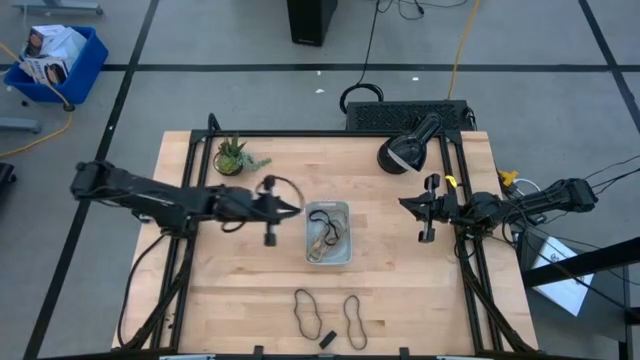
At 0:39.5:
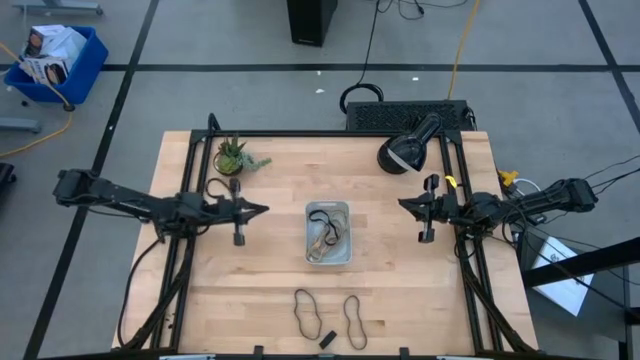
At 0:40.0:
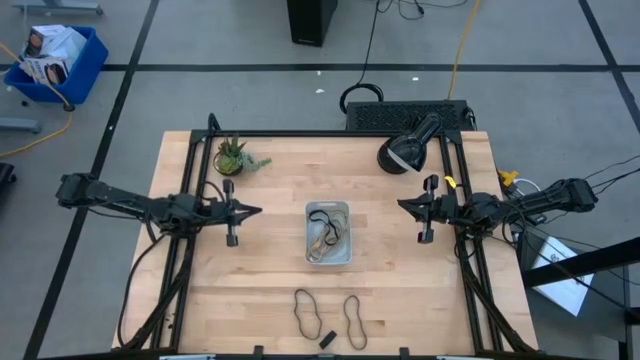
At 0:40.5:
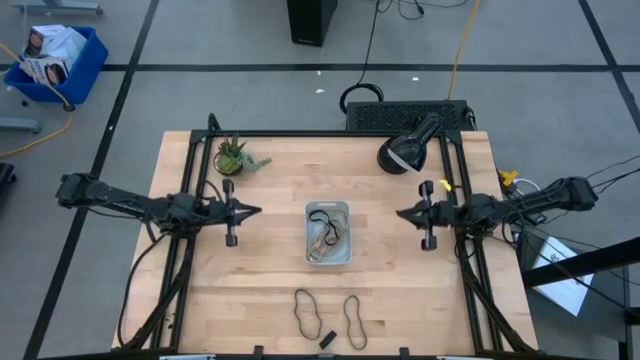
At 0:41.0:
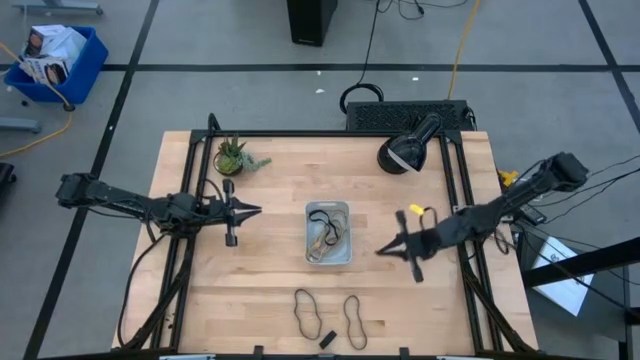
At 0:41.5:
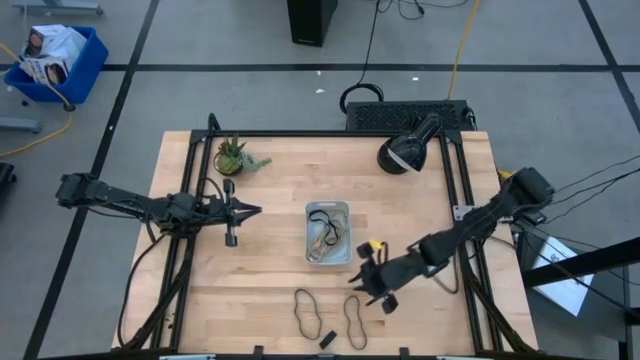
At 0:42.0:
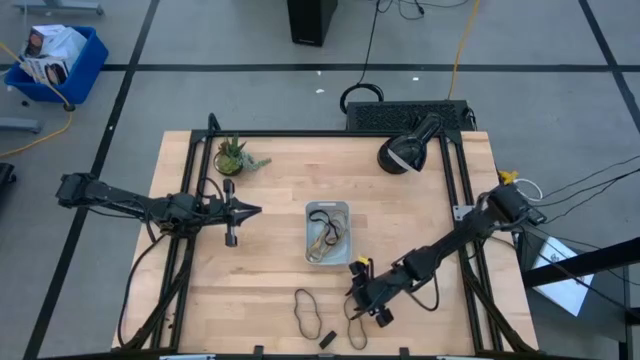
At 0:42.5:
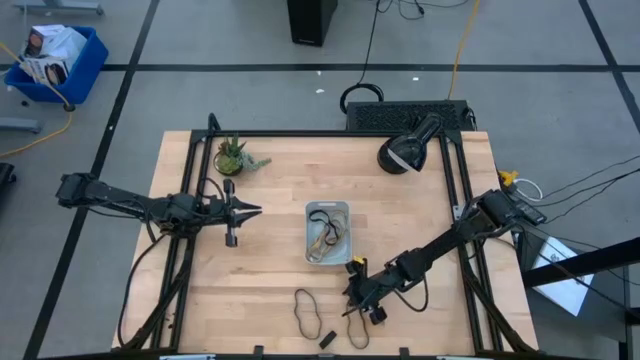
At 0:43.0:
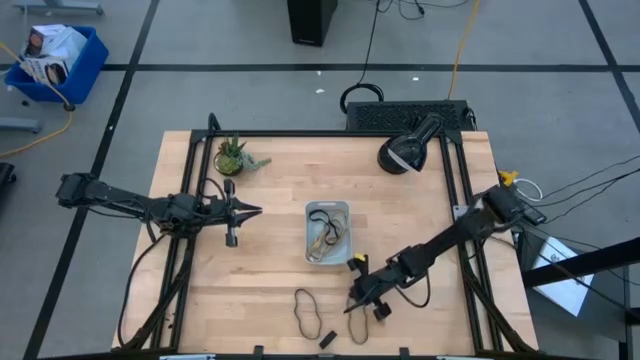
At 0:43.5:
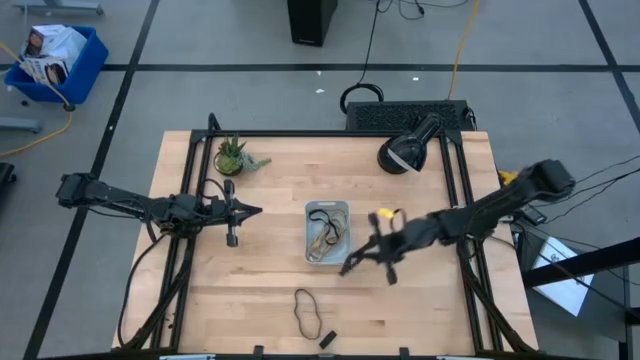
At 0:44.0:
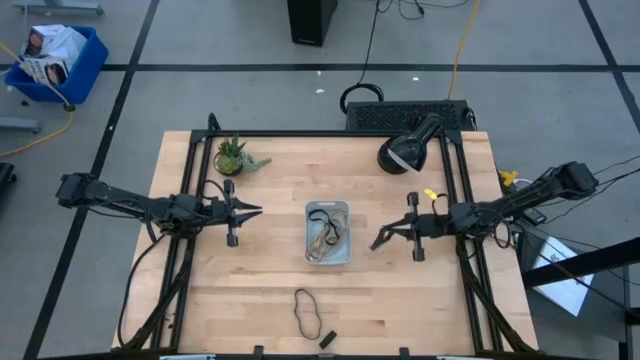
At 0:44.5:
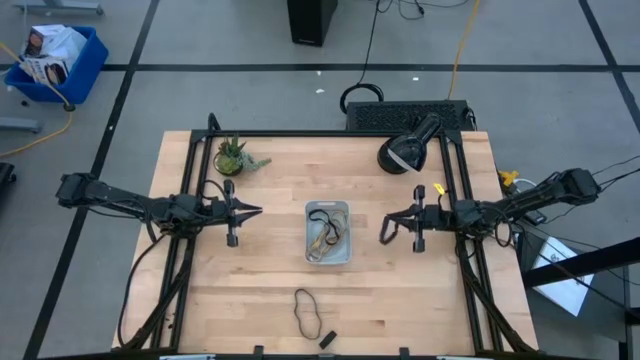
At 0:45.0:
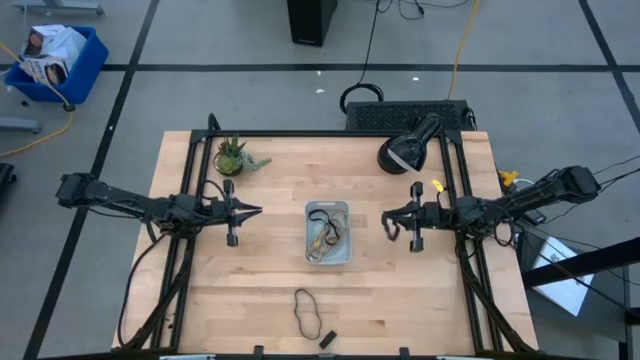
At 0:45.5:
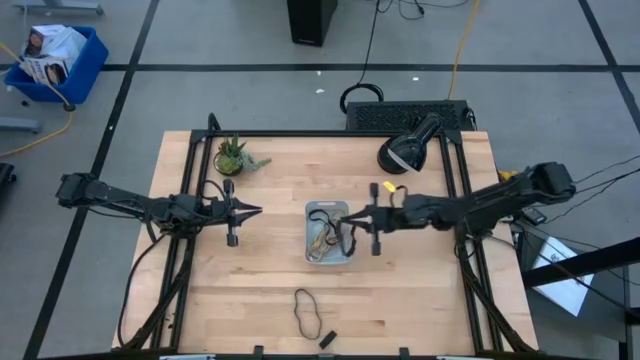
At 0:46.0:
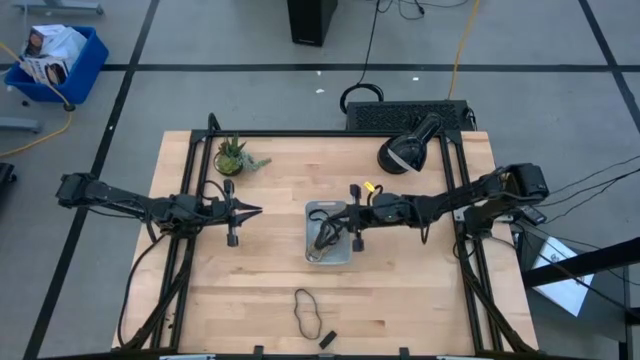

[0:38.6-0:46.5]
Task: Pick and place rubber bands into bin
Put the right black rubber band into the bin

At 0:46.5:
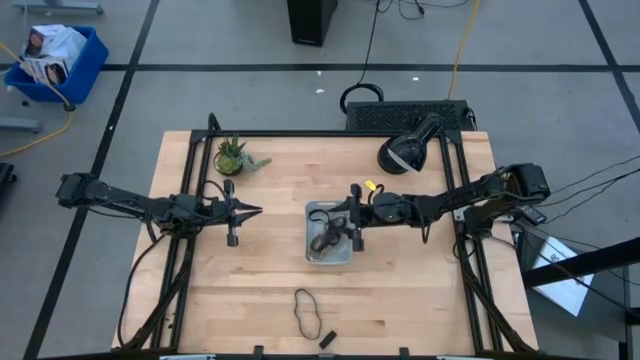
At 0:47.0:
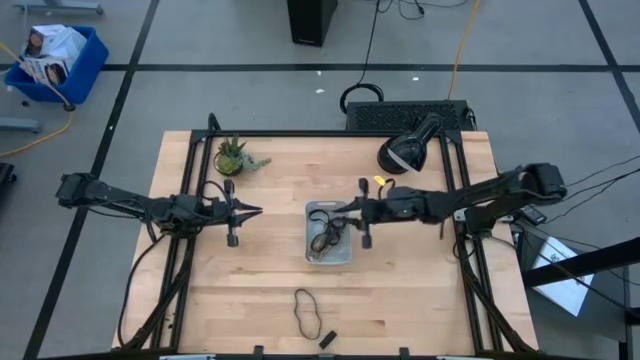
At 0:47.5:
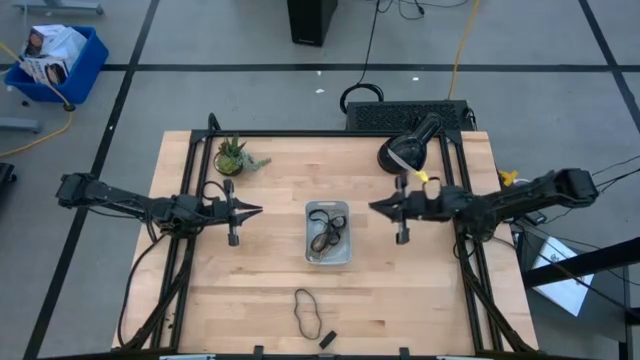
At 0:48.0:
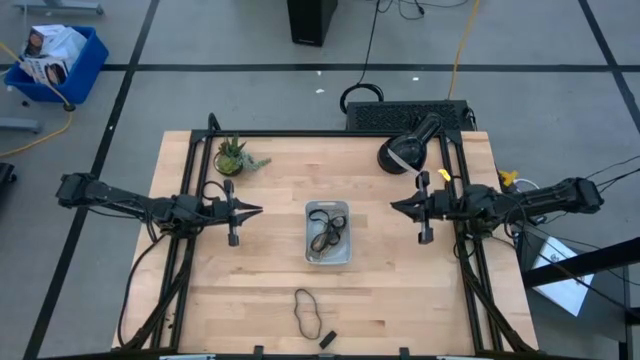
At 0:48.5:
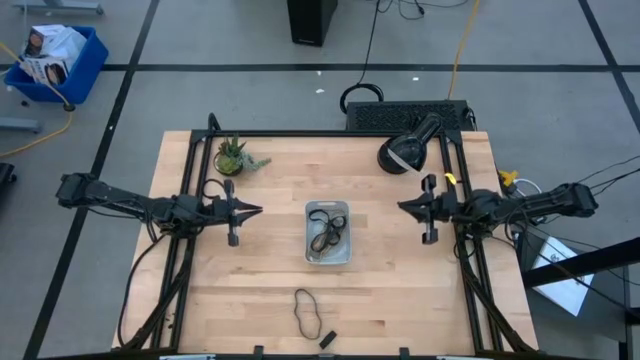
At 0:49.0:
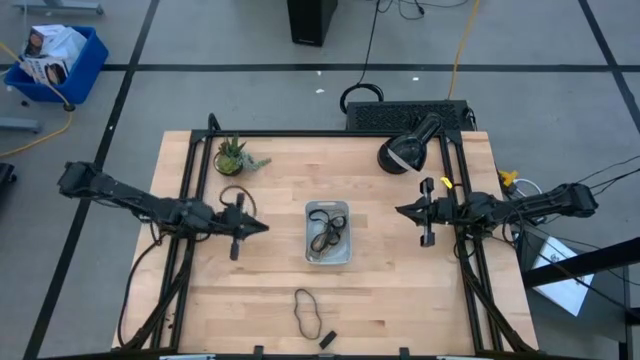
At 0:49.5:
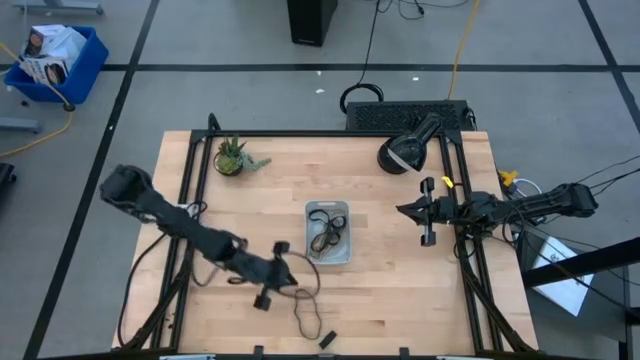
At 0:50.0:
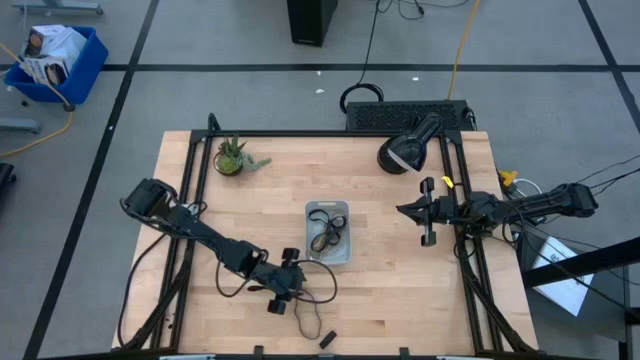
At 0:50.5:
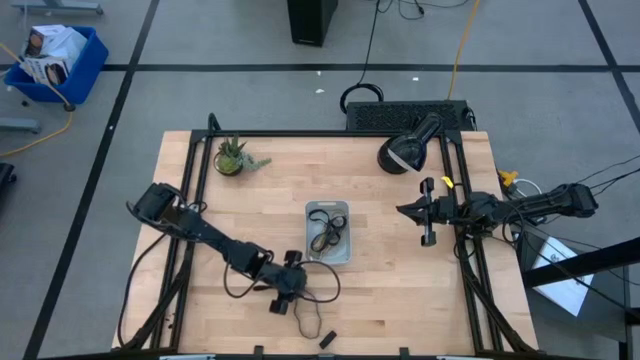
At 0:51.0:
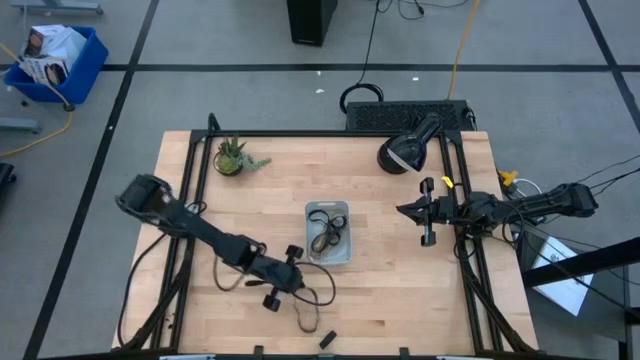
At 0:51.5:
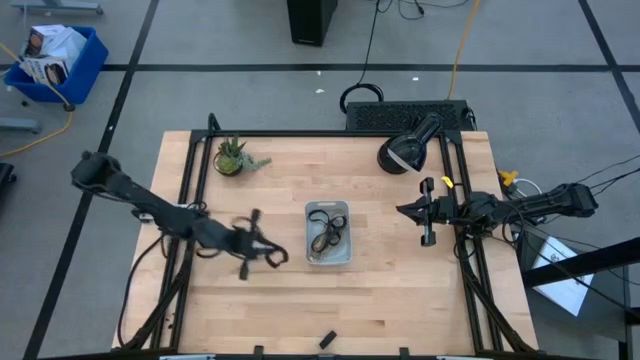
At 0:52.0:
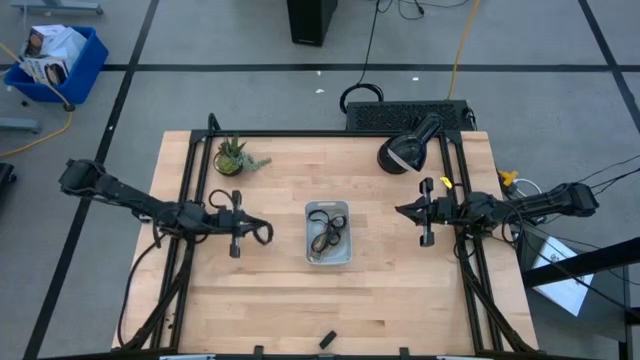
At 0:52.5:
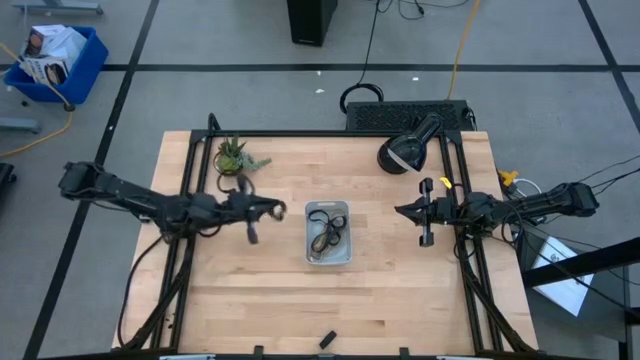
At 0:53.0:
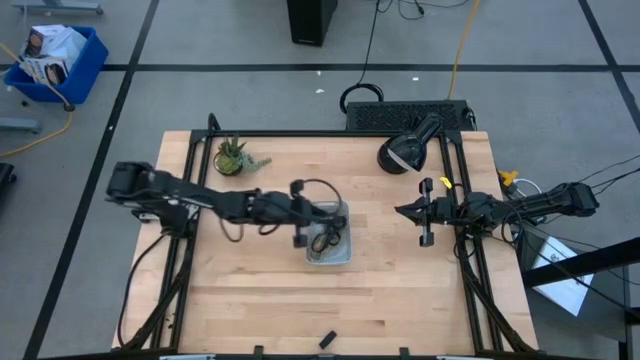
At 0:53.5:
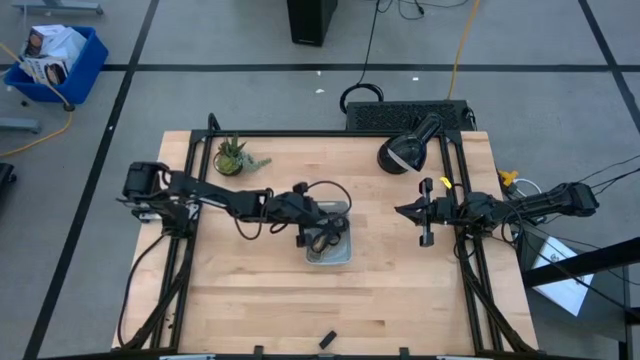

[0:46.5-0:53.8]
Put the black rubber band into the bin

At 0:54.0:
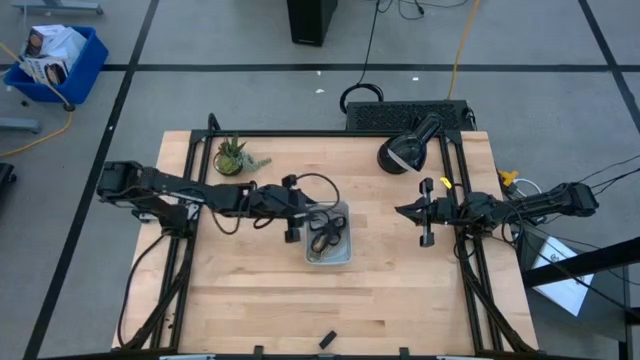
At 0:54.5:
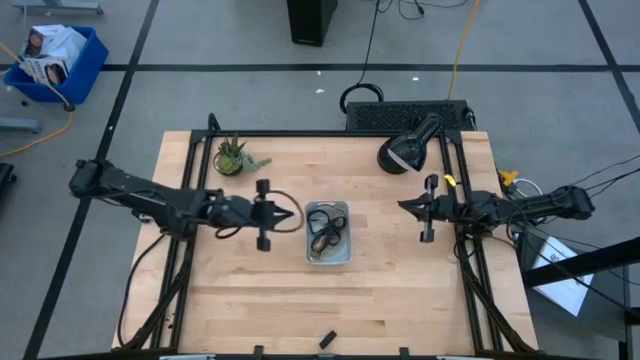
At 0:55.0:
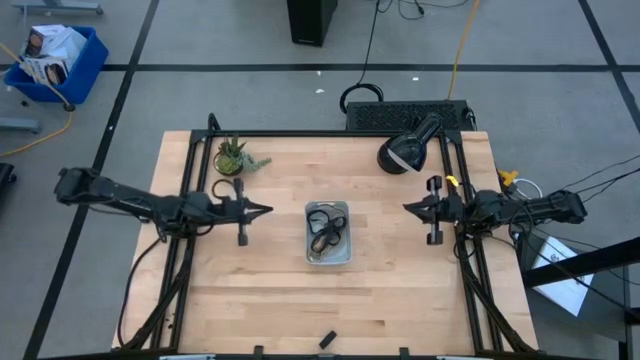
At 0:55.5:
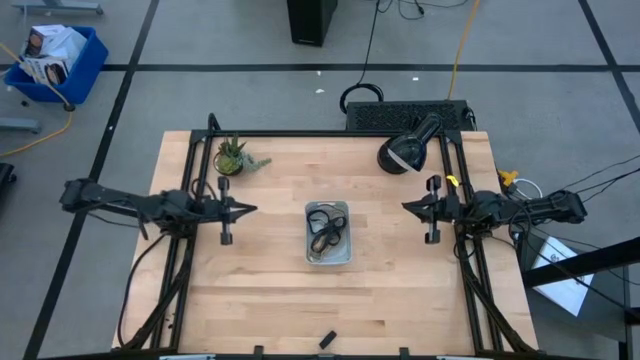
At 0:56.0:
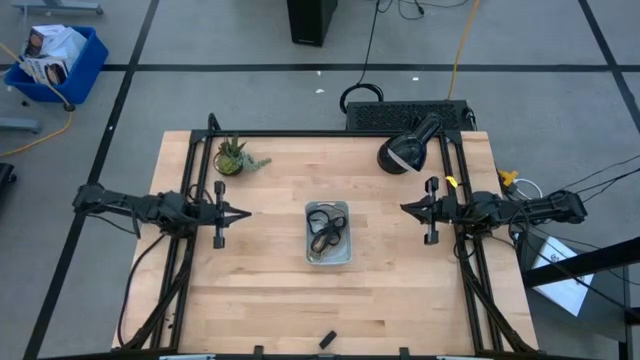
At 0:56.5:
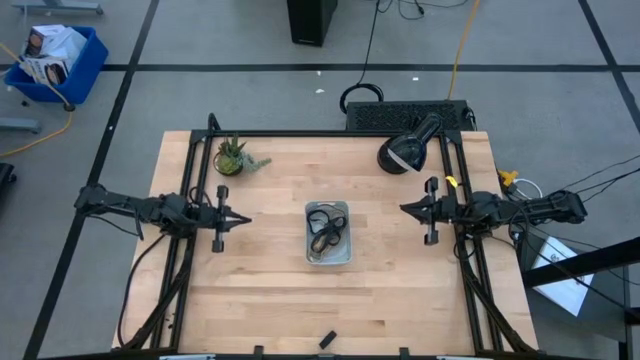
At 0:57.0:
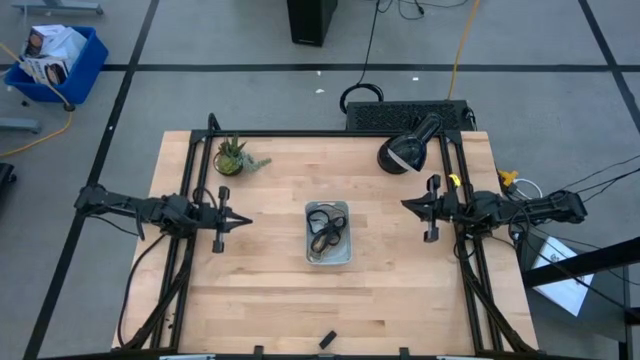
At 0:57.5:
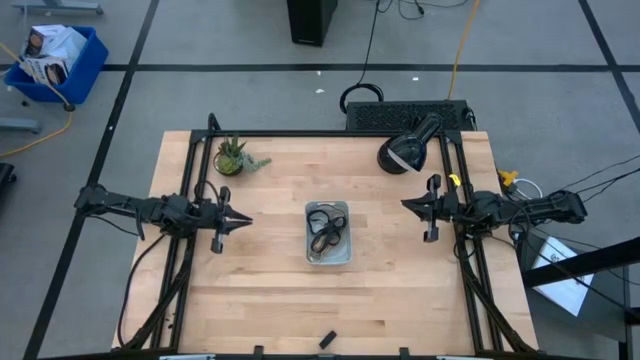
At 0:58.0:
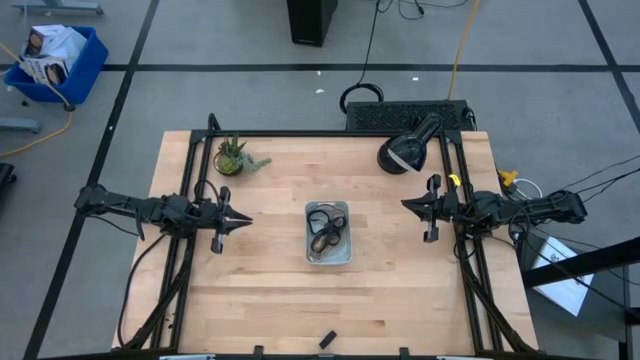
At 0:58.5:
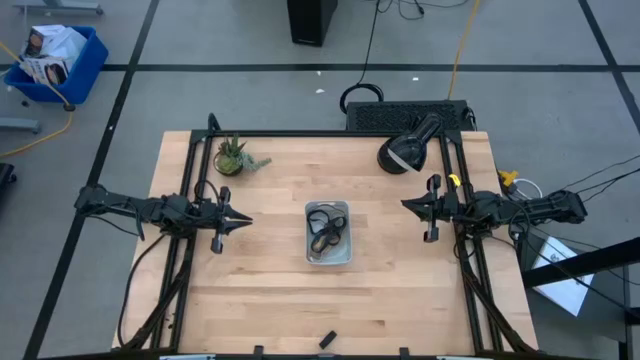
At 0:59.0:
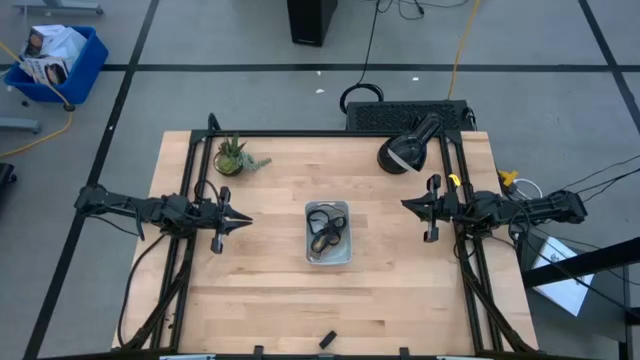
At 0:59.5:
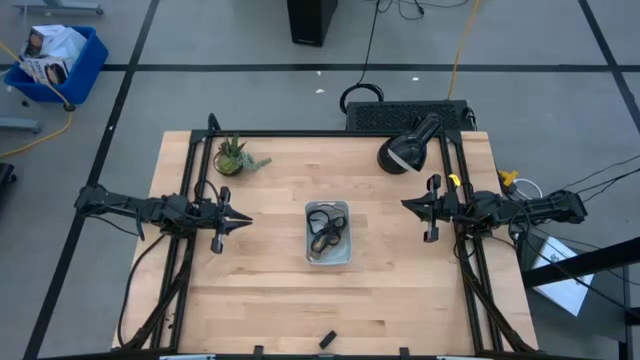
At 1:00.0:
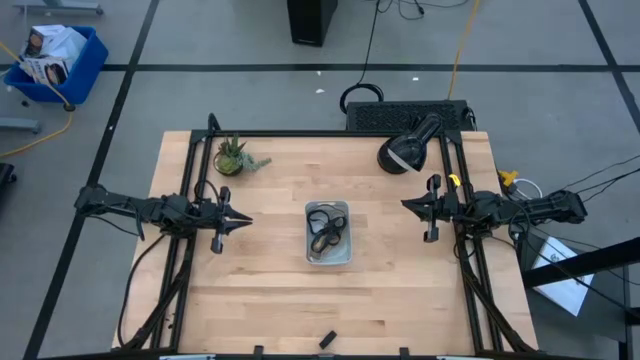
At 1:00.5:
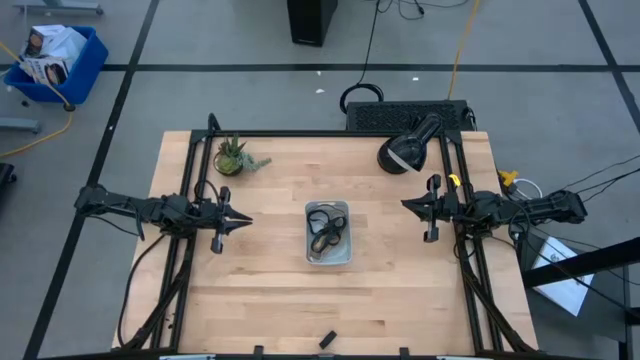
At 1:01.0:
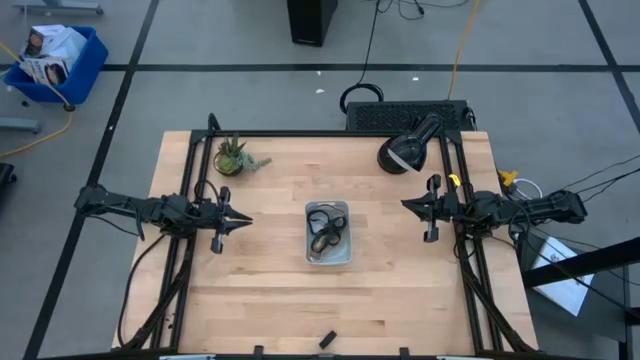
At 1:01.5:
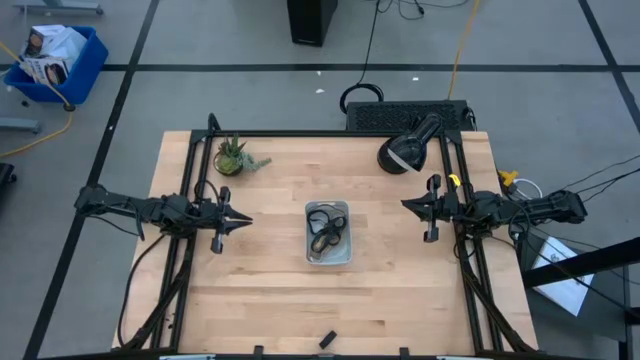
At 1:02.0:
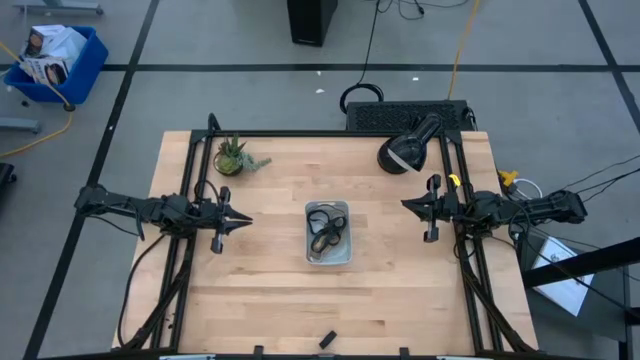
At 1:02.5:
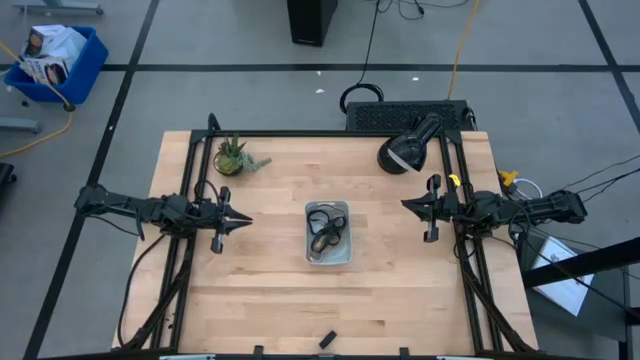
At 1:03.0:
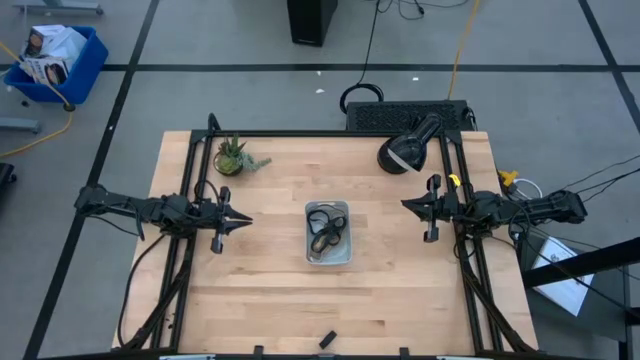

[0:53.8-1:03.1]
Return to Home Position
